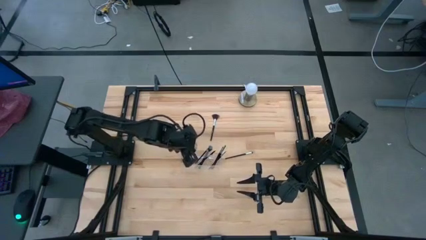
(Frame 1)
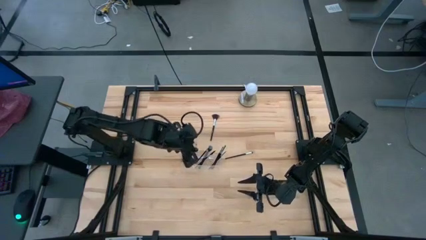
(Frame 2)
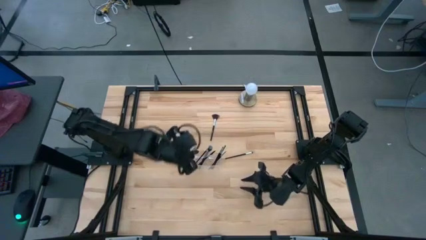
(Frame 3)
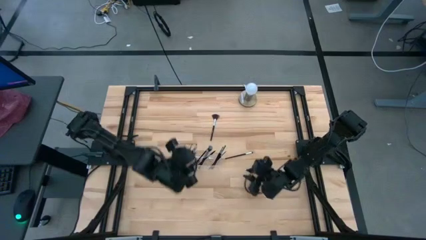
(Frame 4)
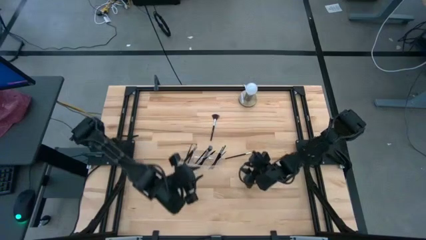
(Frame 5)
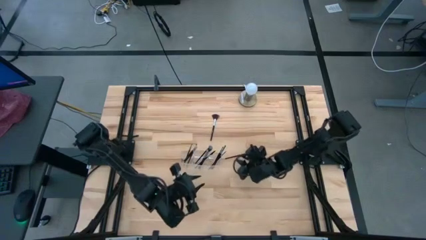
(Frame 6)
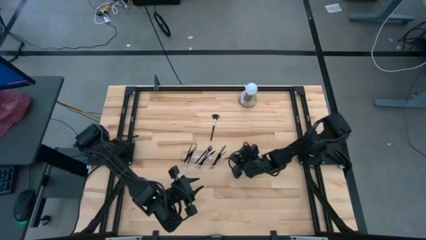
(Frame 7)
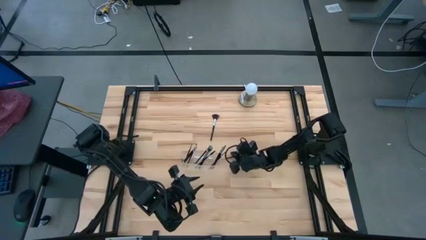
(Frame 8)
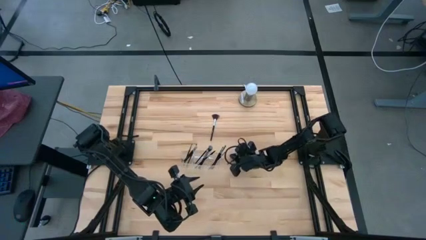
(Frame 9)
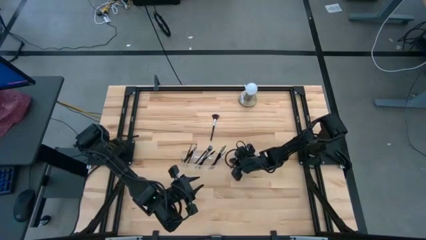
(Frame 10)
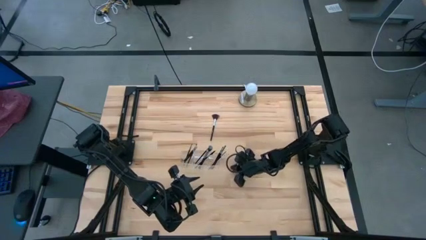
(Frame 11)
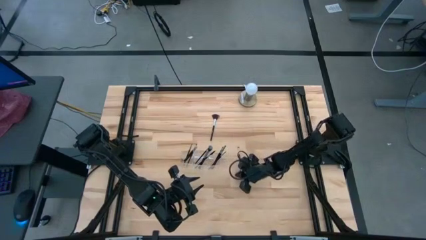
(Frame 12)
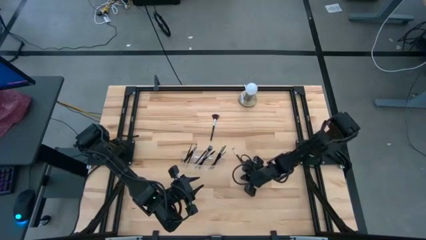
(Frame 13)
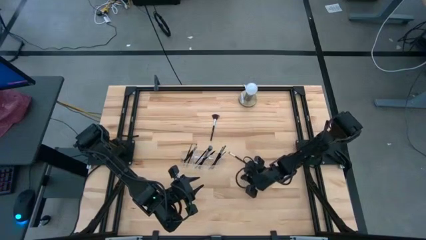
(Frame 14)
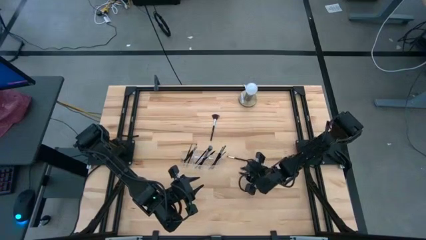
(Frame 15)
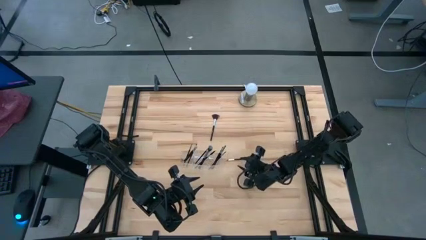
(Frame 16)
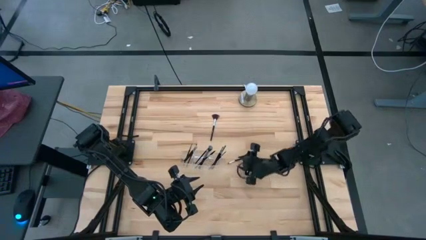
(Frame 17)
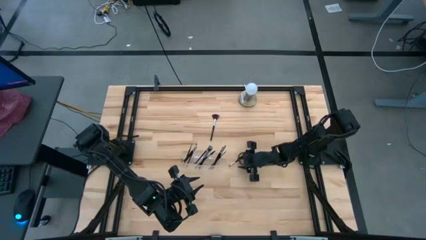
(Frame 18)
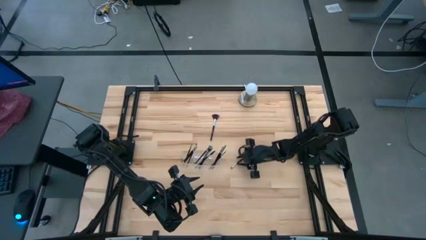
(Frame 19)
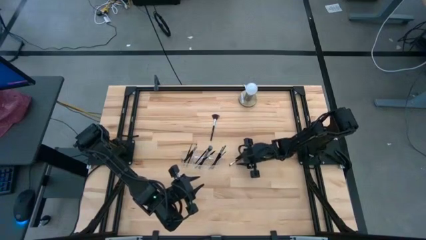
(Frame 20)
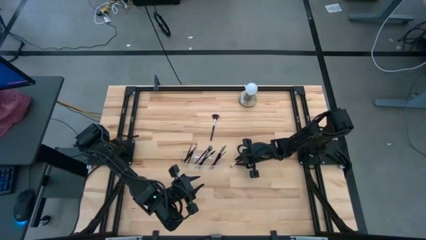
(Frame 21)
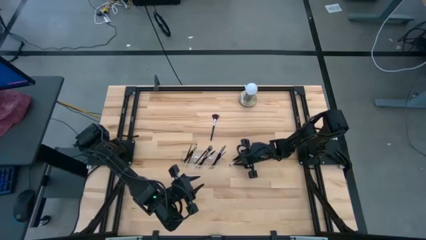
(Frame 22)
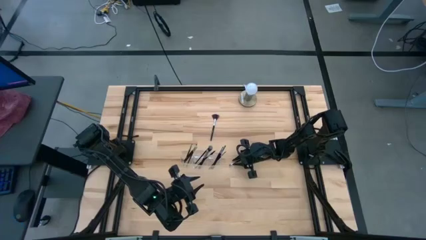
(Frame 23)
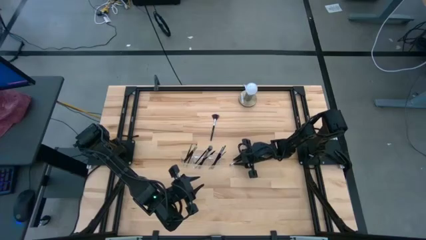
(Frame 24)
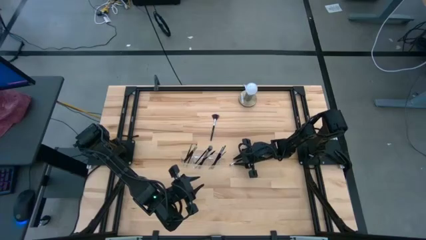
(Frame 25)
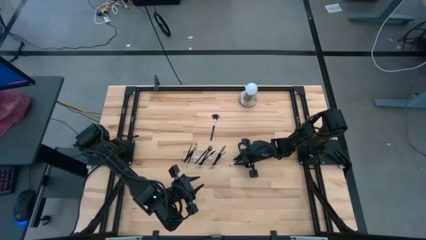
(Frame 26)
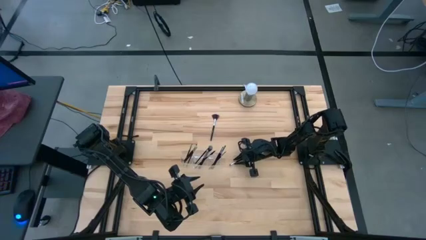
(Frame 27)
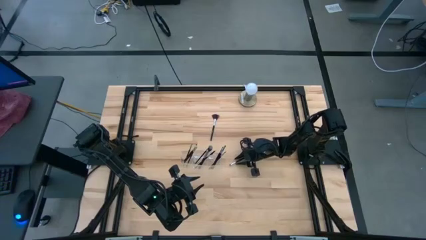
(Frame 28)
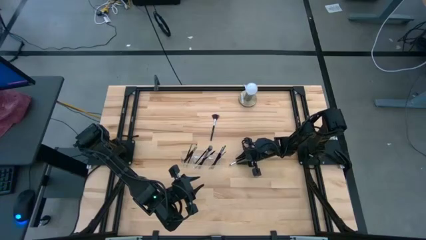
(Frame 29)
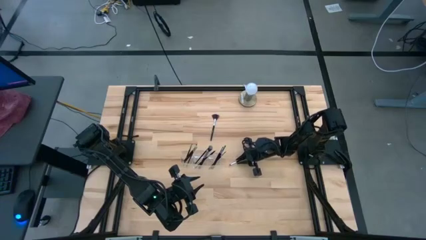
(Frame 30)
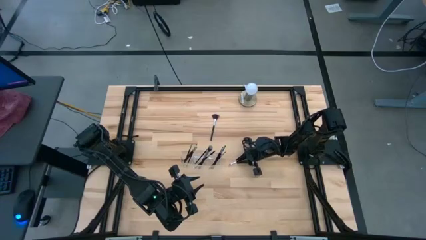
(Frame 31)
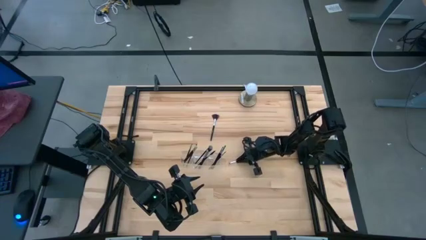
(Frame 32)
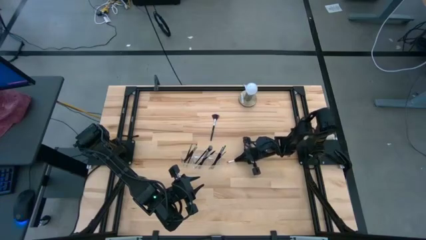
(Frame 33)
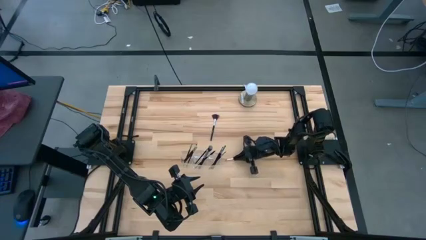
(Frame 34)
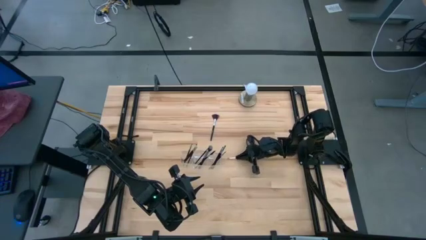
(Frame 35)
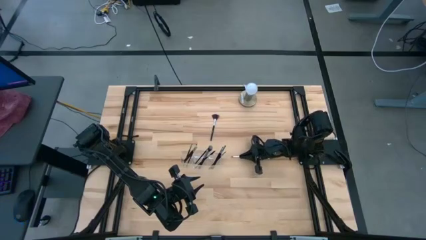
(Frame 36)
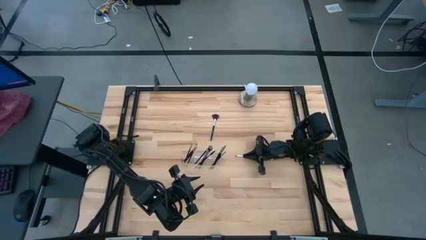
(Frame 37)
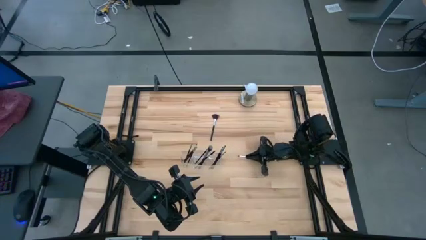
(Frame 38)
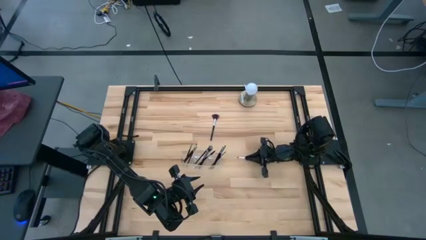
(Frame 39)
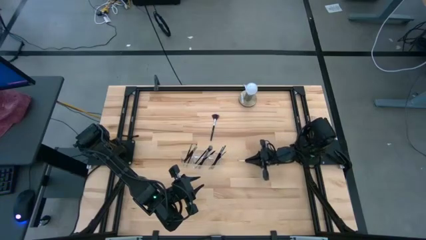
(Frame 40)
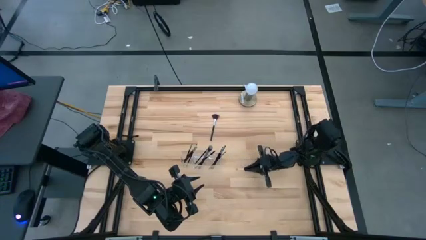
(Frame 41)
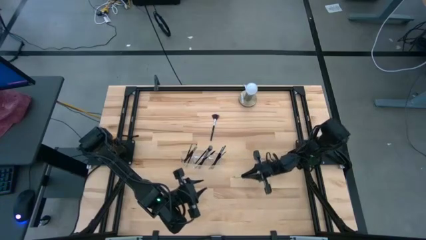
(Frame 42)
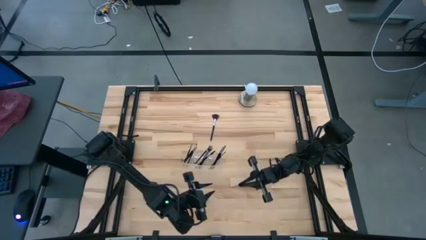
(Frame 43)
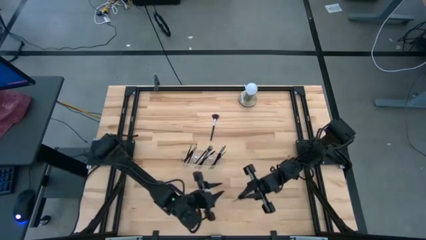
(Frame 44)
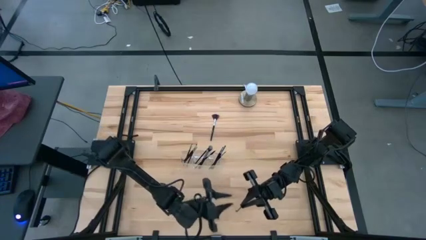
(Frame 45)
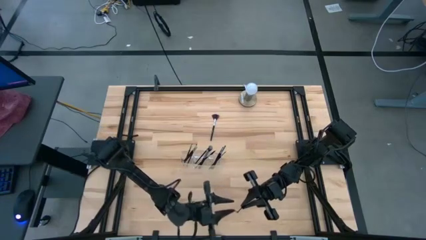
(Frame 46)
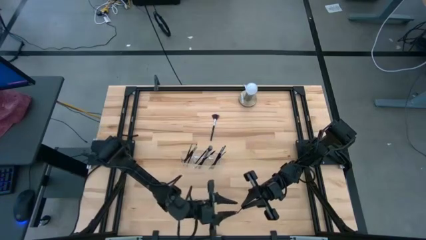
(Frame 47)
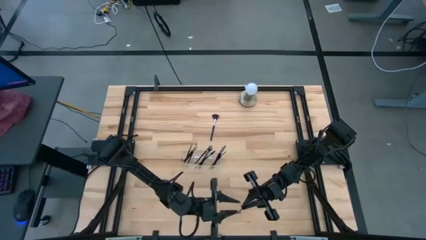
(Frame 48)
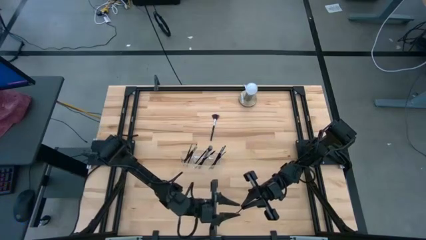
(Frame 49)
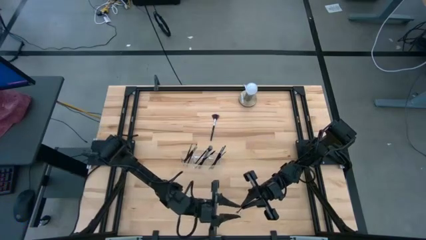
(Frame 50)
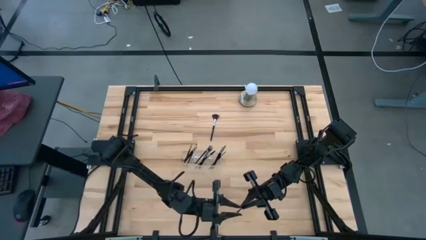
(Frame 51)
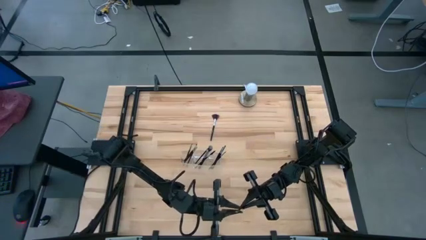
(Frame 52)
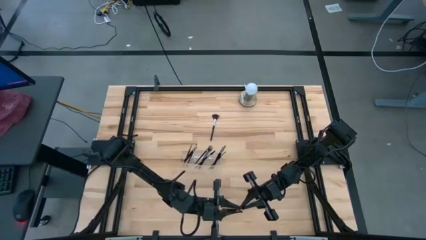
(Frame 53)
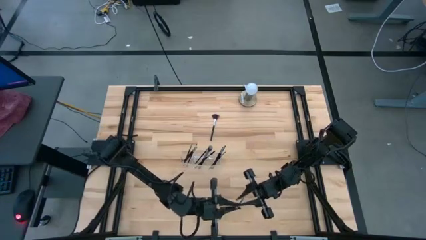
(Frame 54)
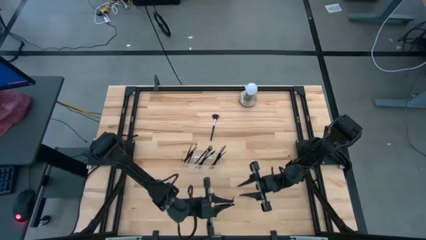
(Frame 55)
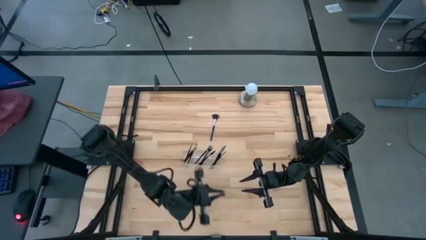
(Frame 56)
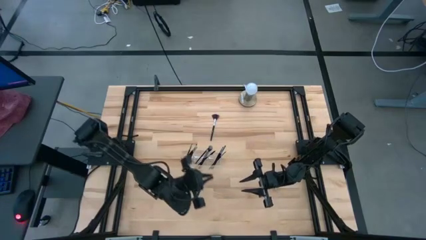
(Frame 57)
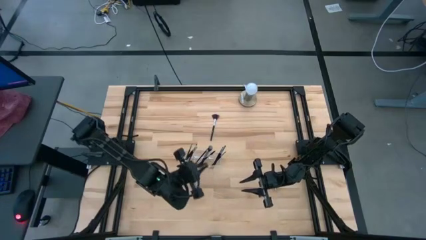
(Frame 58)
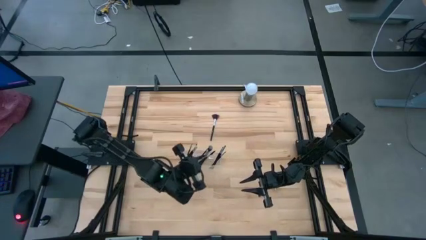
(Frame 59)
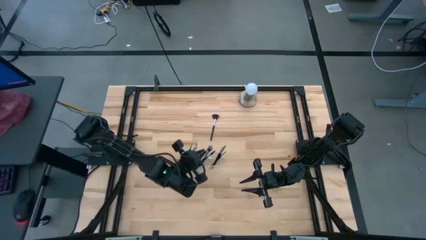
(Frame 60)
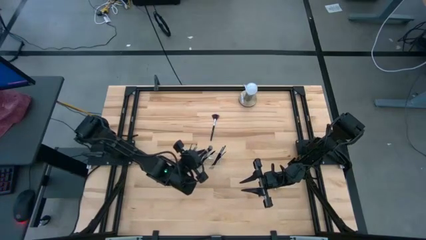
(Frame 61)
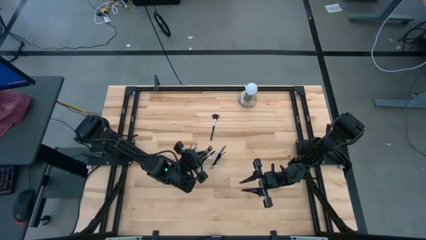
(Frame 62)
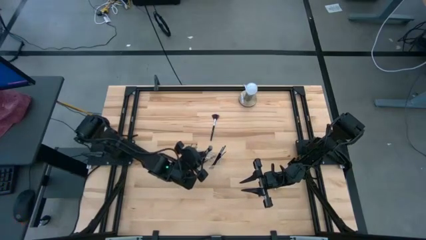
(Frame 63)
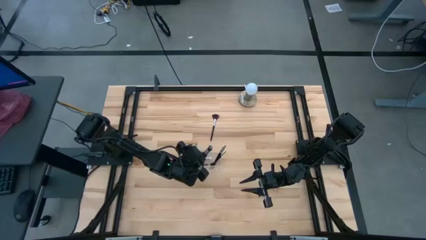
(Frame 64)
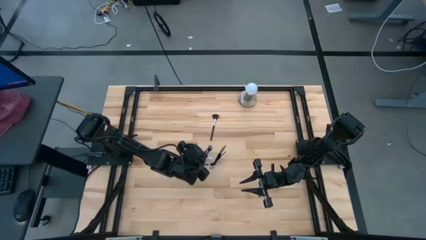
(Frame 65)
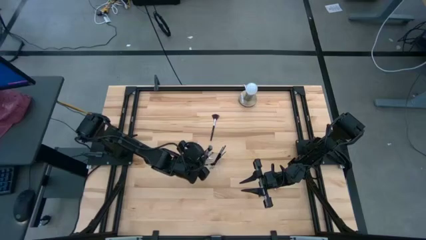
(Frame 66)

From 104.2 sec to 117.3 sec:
Task: Put items in baskets/containers
Put the eyeshadow brush into the transparent organizer

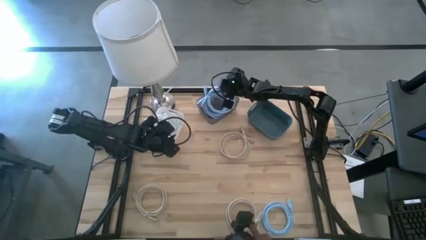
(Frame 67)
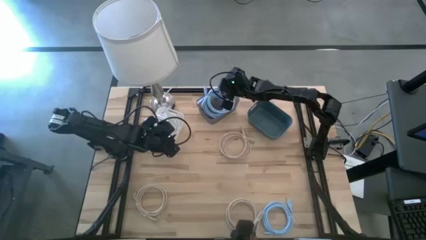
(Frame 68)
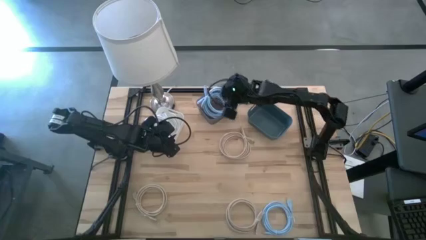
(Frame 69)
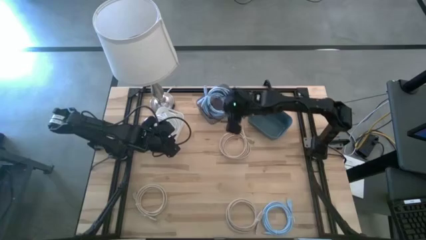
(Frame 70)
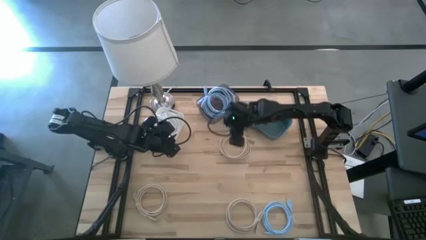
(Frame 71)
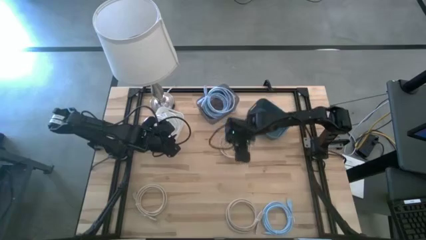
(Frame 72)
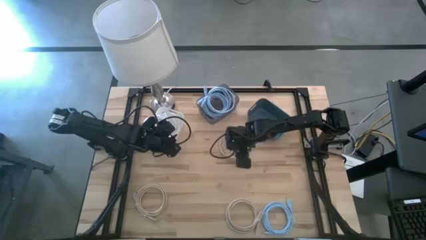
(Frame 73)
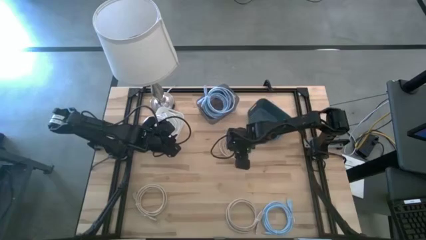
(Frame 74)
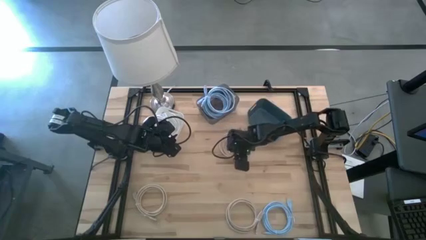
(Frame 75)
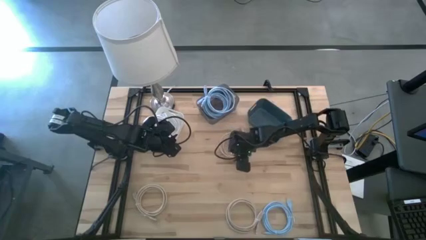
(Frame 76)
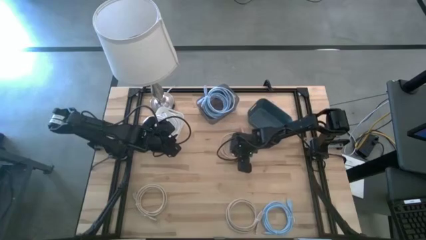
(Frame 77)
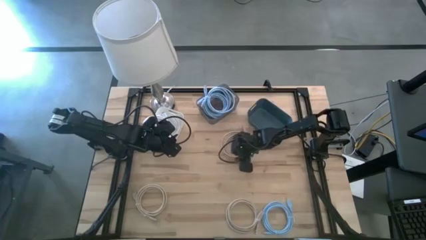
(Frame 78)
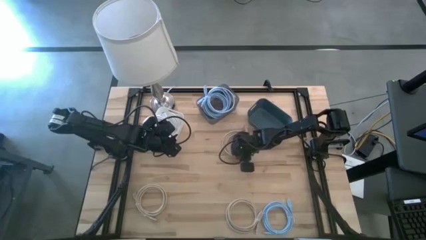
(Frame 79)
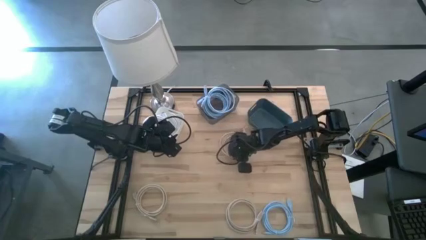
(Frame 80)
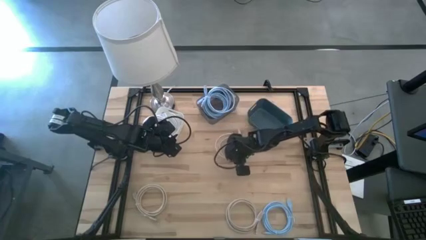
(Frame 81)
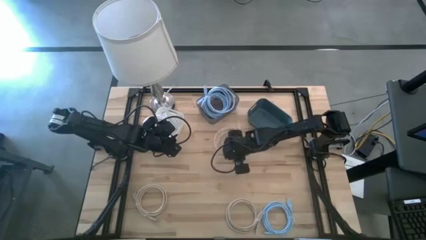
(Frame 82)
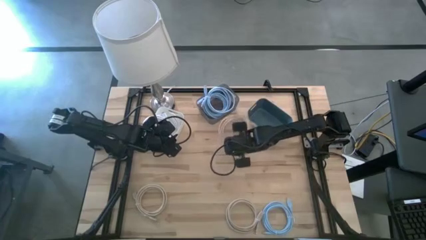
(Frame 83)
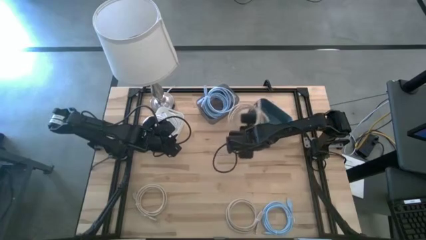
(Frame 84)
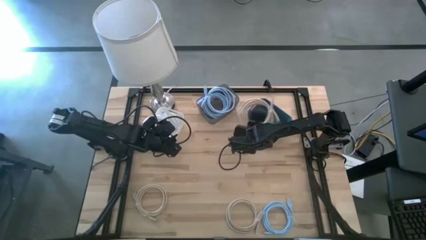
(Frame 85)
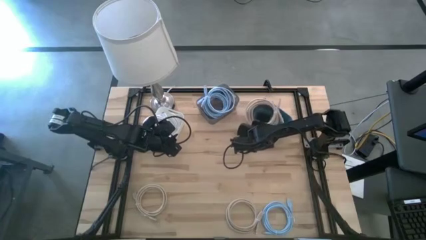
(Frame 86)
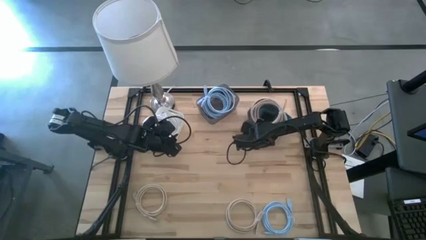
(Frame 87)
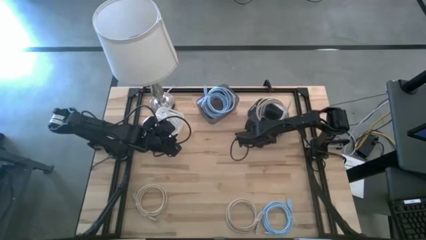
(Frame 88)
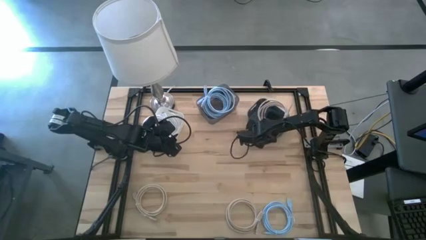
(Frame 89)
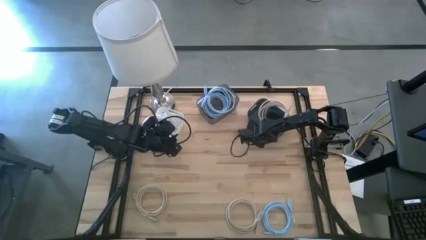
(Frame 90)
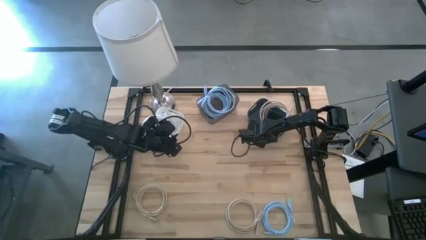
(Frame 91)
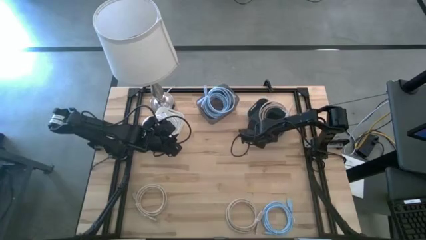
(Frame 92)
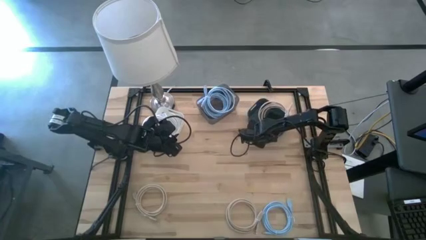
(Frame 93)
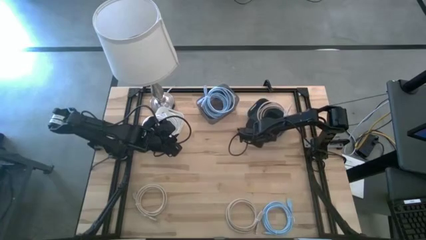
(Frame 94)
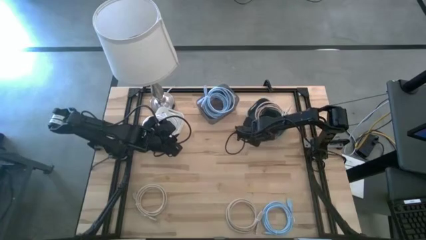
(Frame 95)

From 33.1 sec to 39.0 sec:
Task: Sort HDMI cables
Put the top right light brown HDMI cable into the green bin
